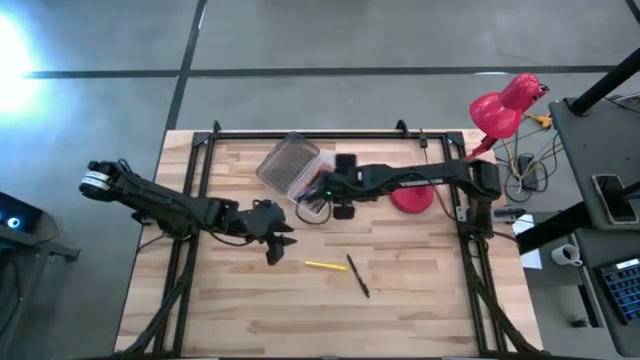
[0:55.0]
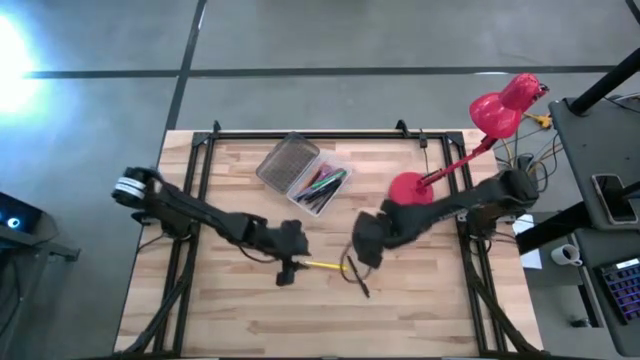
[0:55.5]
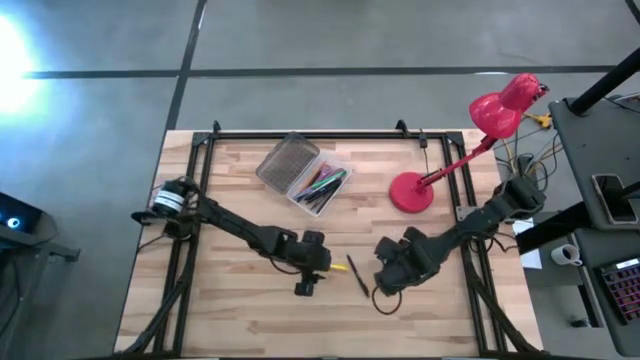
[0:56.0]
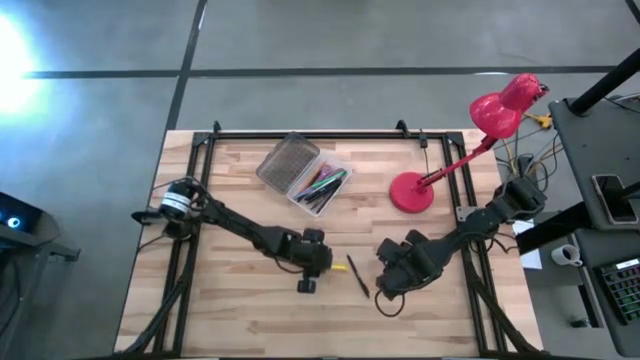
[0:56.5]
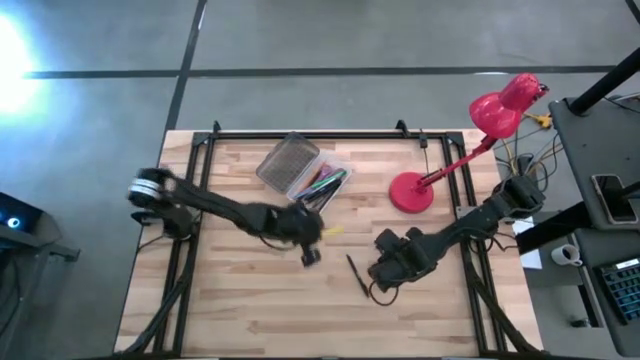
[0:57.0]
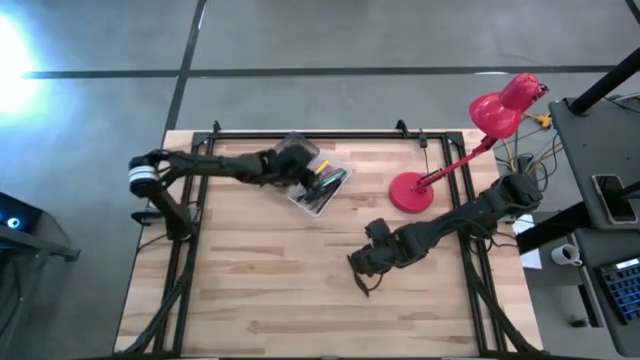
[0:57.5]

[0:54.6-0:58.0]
Task: Pick & place school supplies into a supply box
Put the yellow pen into the black supply box

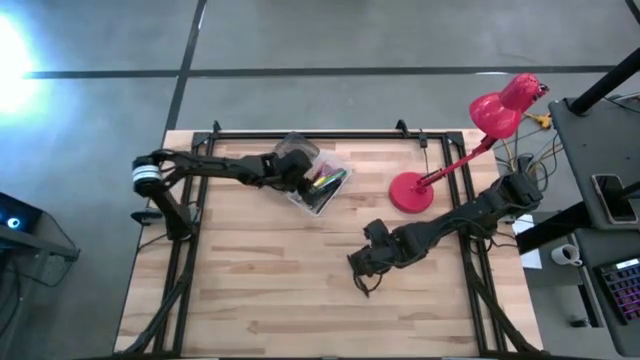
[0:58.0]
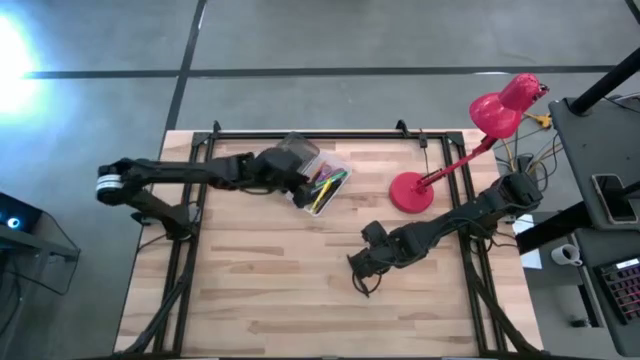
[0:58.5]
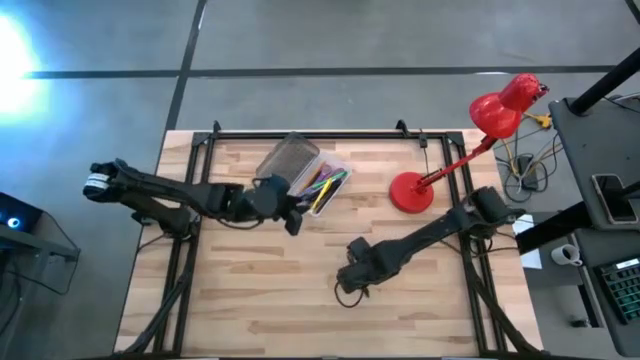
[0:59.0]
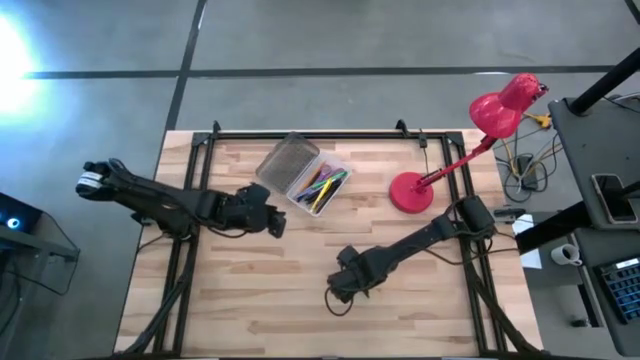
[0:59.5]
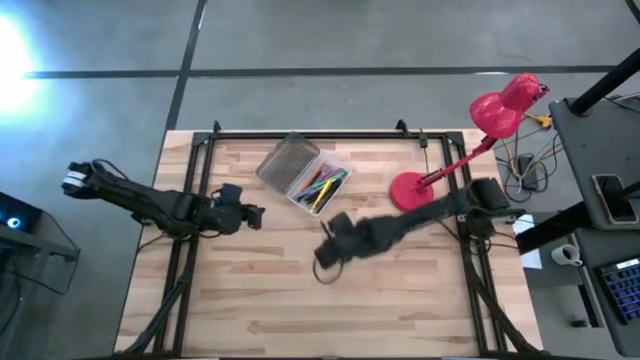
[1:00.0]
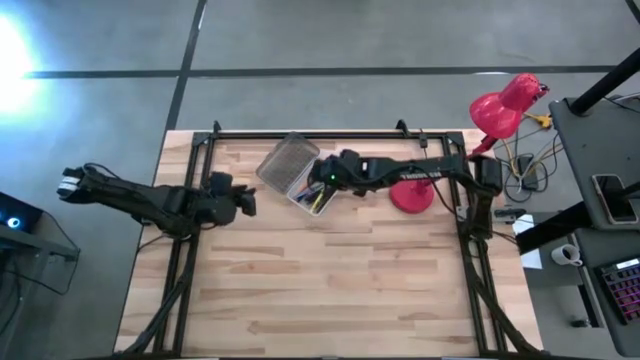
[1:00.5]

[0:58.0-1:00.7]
Put the black pen into the black supply box

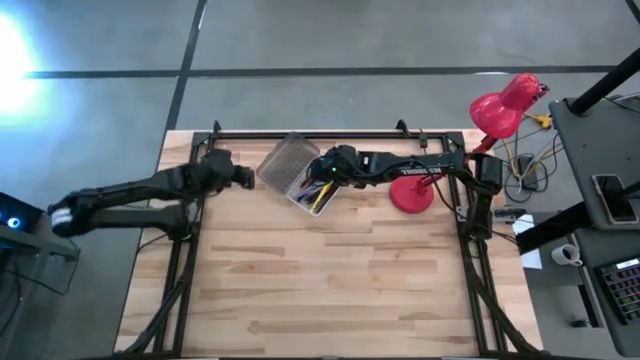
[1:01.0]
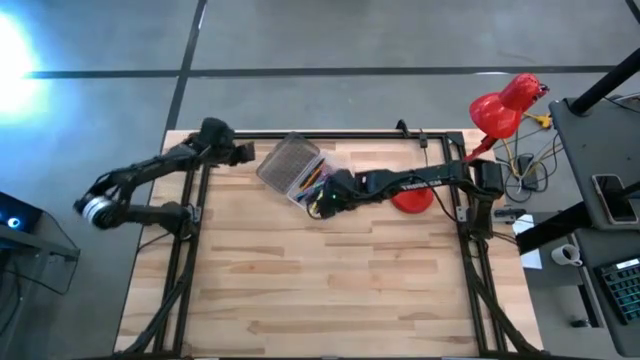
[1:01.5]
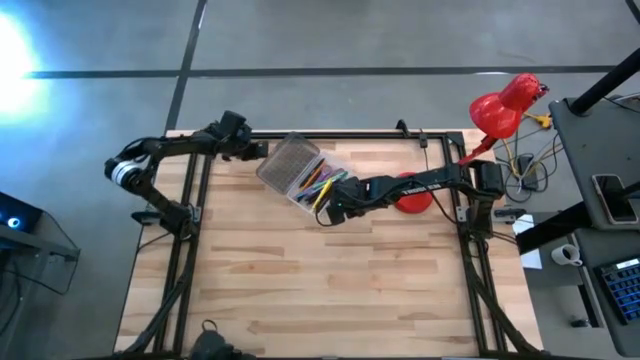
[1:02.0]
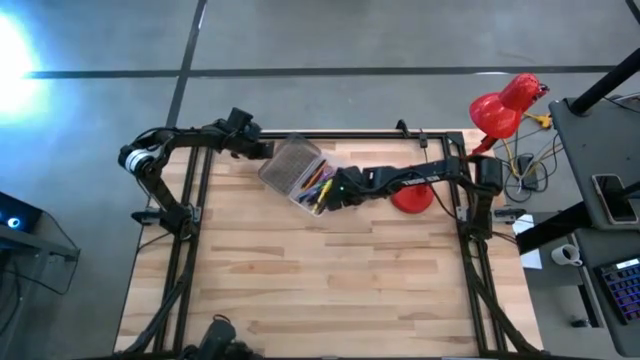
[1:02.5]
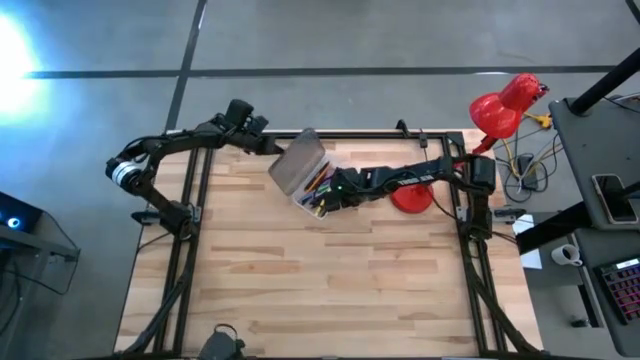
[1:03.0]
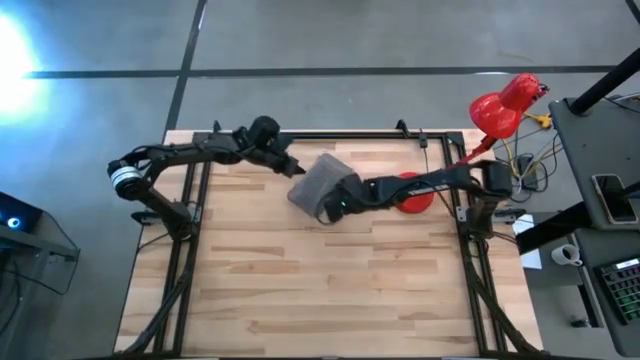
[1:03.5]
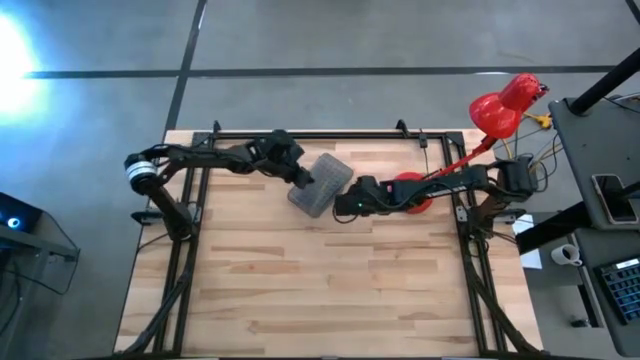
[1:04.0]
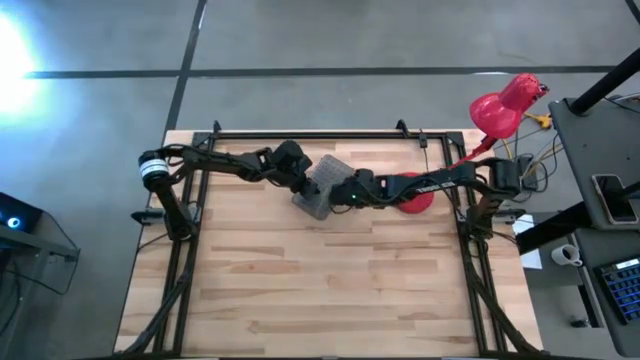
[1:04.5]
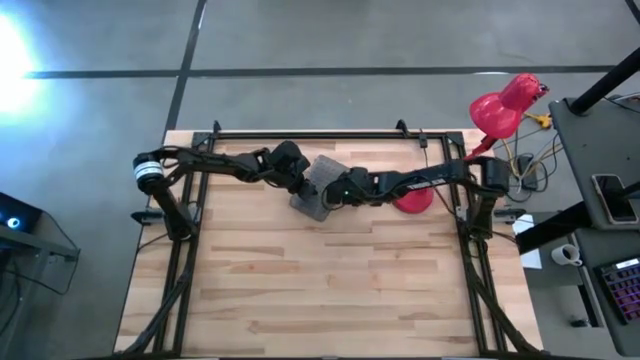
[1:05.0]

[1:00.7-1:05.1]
Close the black supply box

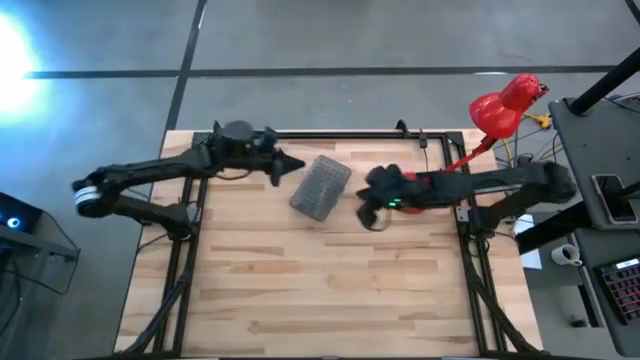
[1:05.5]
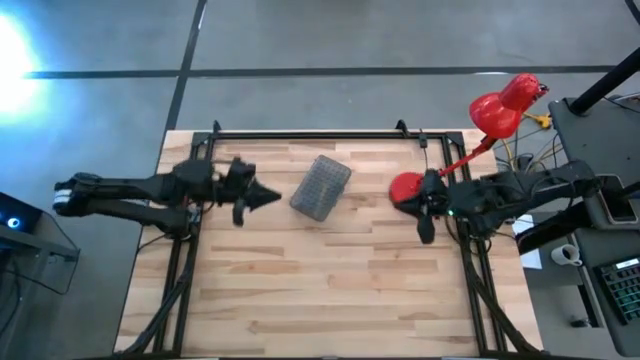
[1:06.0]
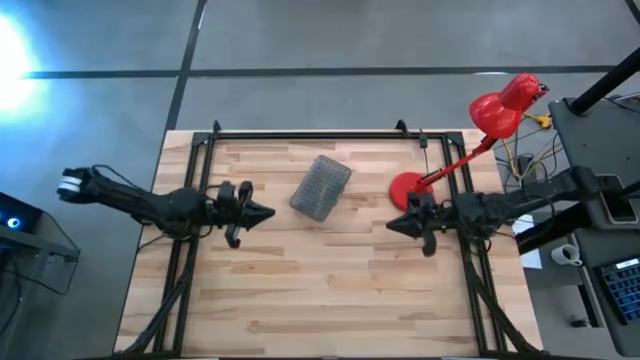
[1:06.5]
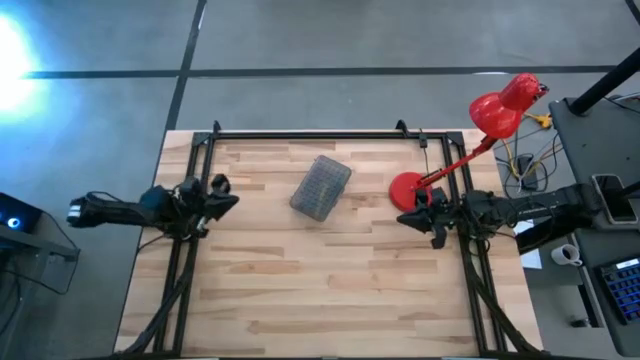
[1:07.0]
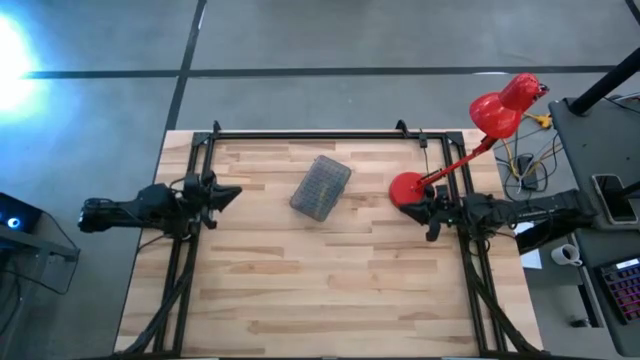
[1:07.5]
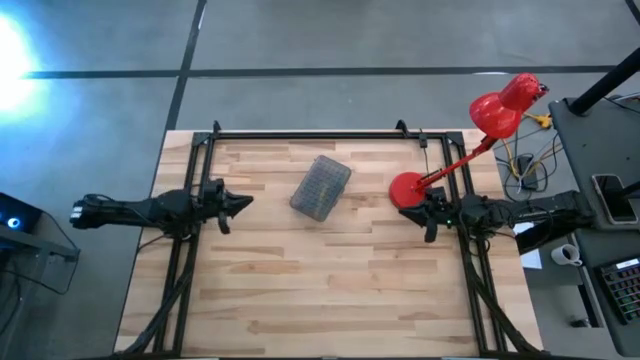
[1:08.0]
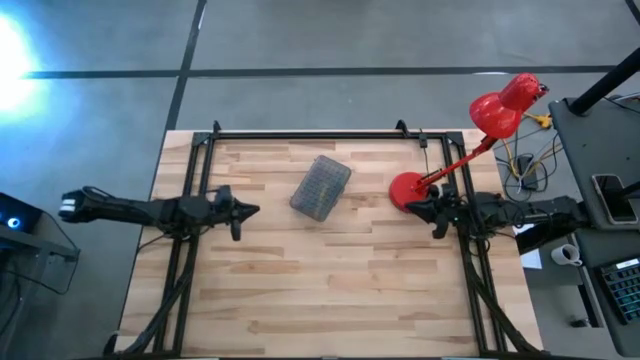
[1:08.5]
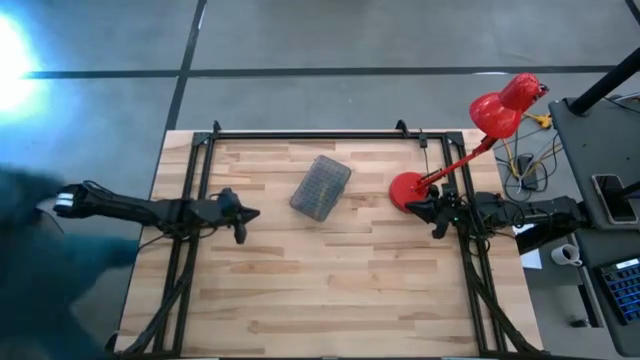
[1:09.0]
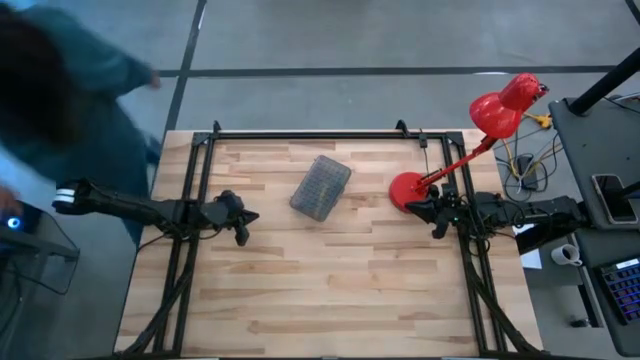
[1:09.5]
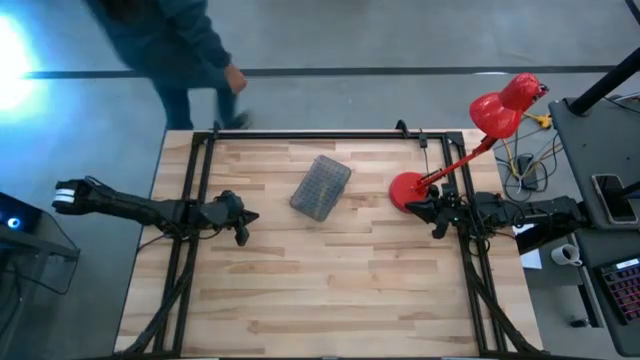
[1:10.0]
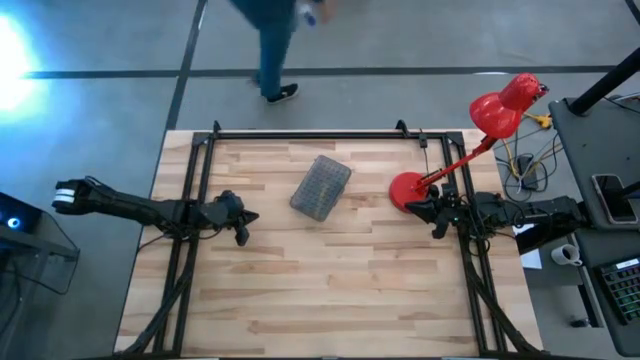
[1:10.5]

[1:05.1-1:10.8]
Return to Home Position

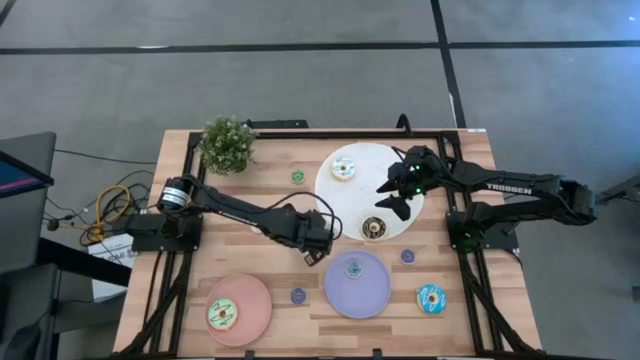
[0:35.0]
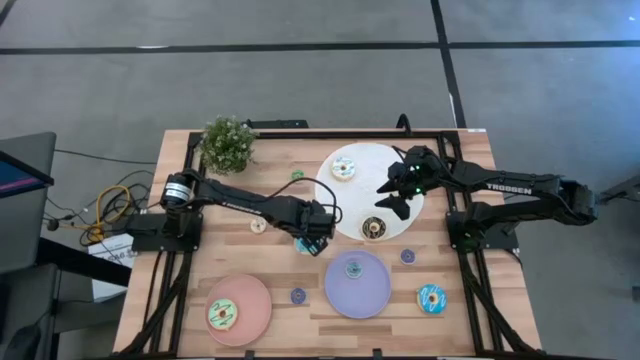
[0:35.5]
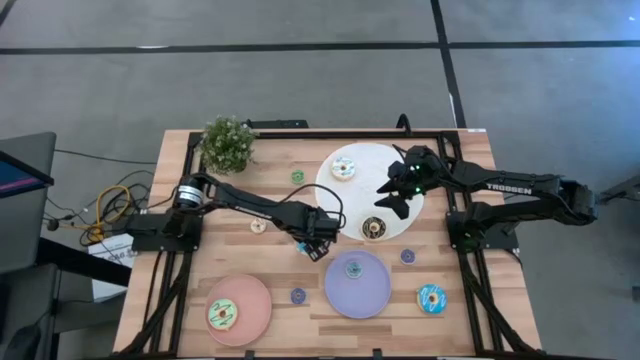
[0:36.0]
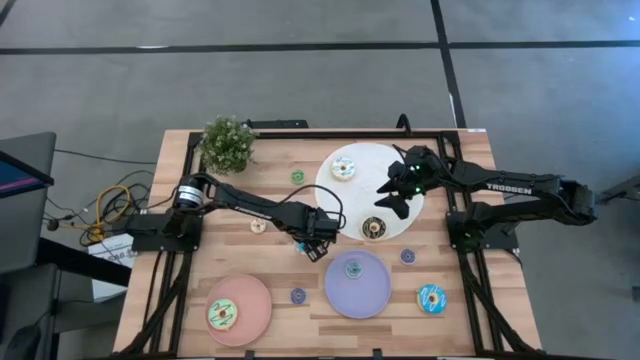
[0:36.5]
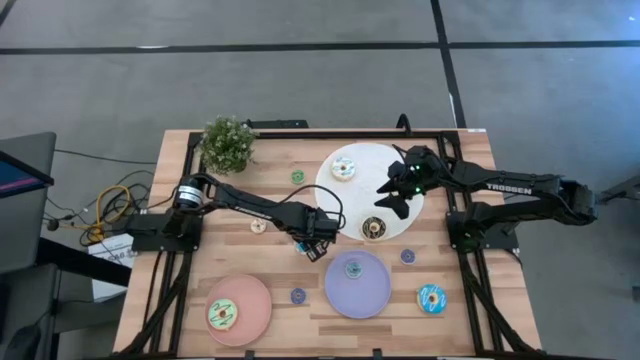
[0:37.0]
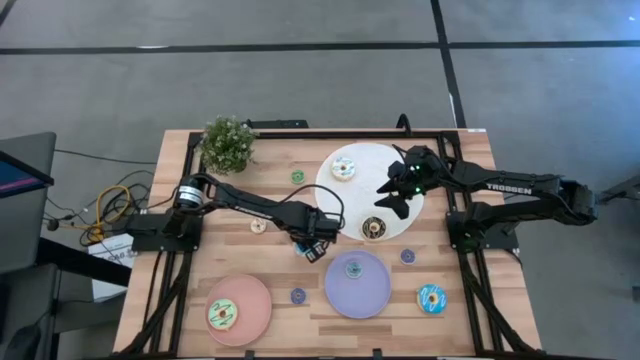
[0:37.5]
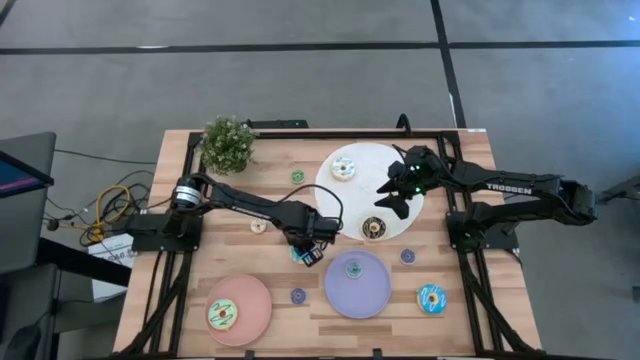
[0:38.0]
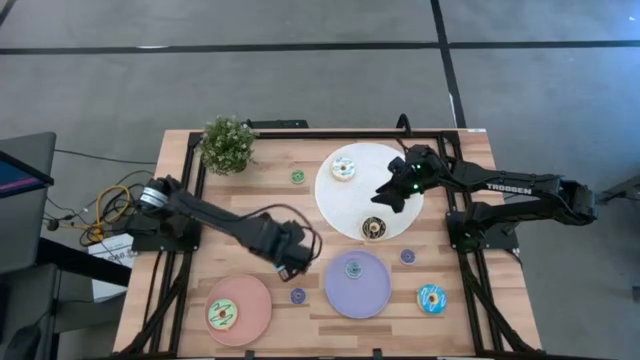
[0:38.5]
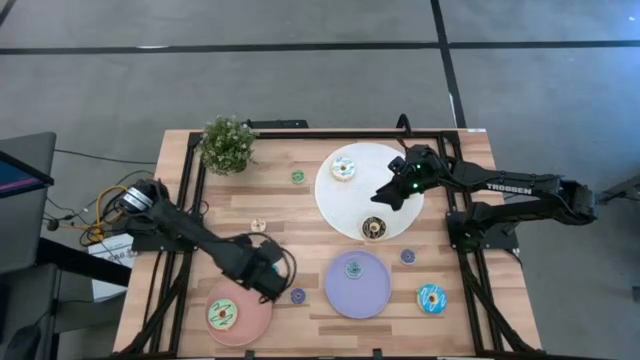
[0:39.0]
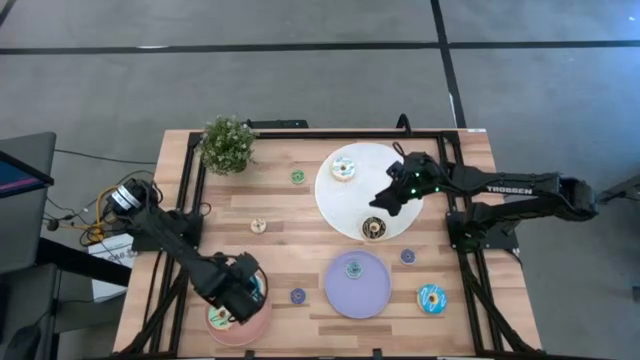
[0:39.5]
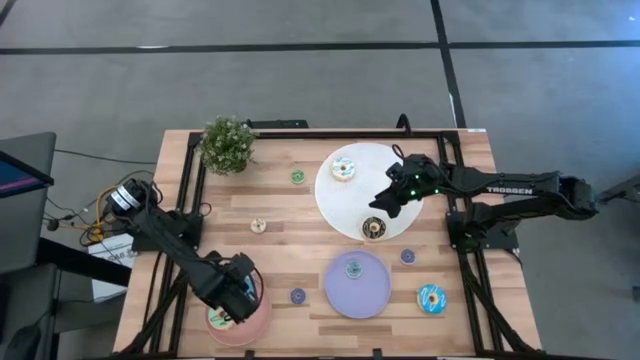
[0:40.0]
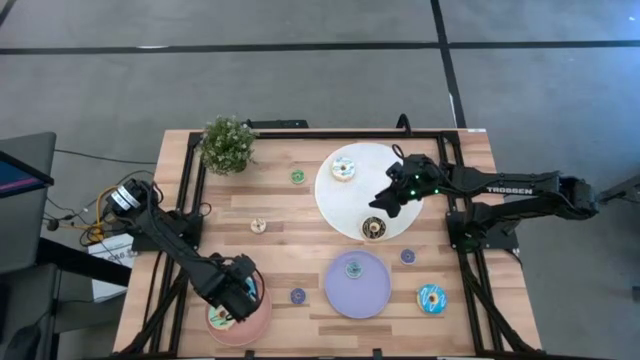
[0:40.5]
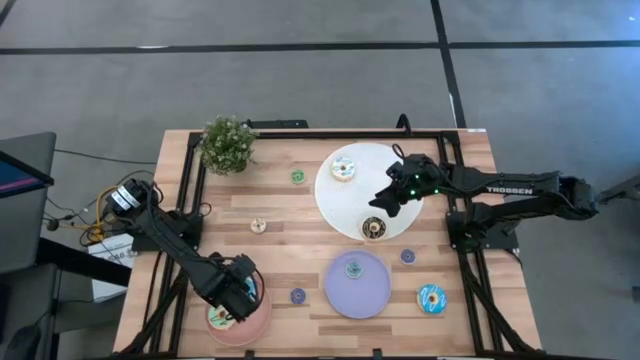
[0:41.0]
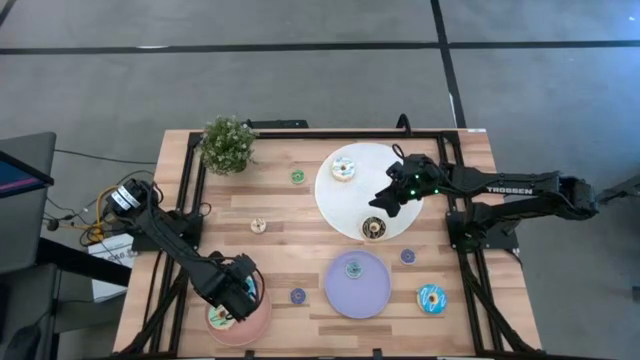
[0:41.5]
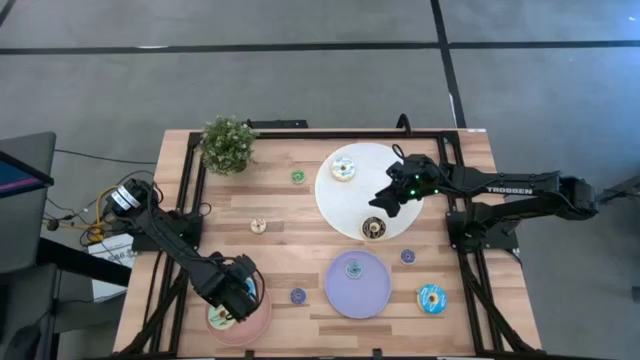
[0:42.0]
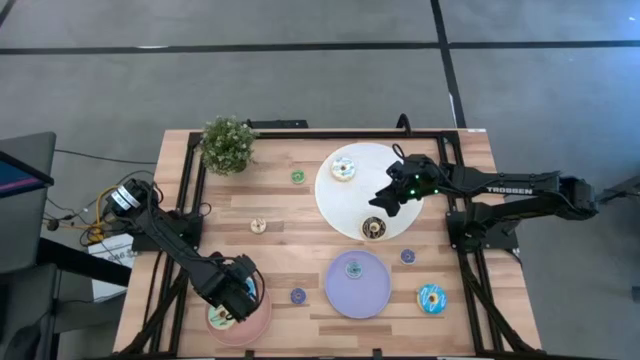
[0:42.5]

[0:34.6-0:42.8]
Task: Pick & Place donuts
Put the left big light blue donut on the pink plate
